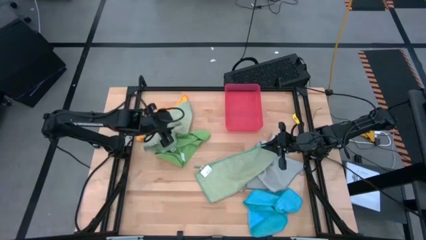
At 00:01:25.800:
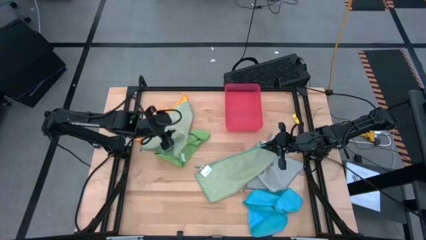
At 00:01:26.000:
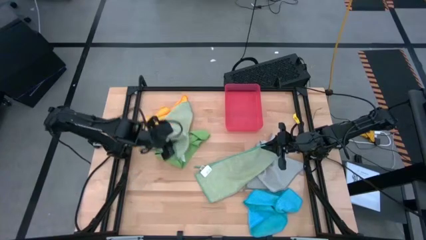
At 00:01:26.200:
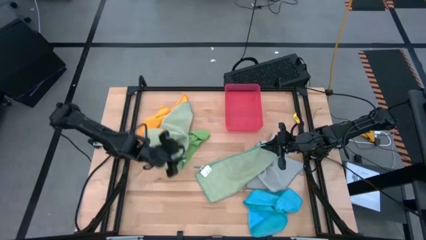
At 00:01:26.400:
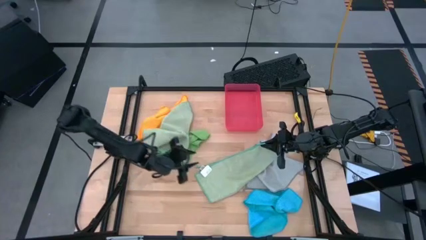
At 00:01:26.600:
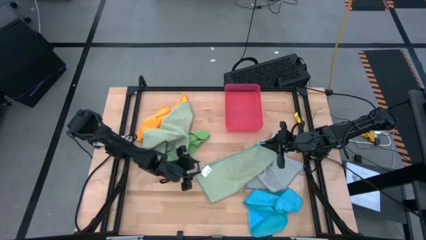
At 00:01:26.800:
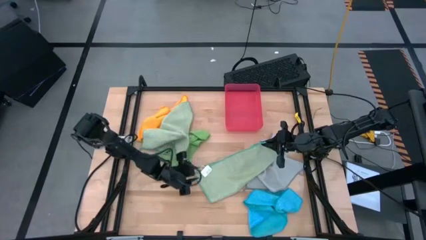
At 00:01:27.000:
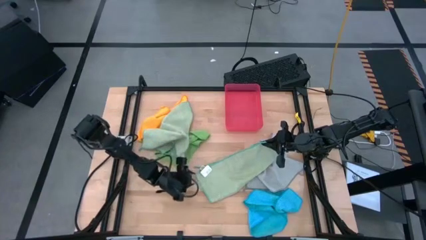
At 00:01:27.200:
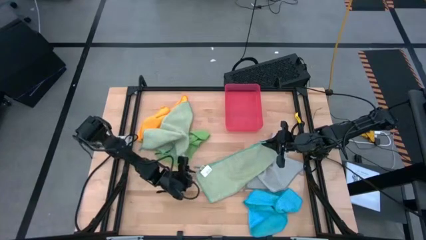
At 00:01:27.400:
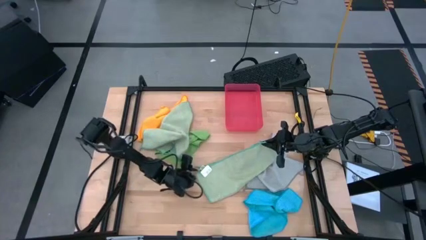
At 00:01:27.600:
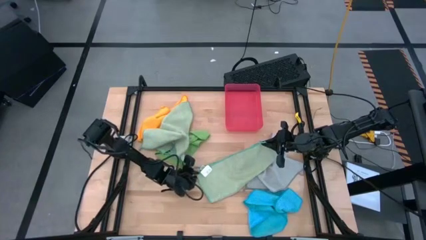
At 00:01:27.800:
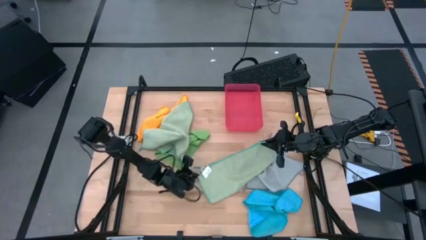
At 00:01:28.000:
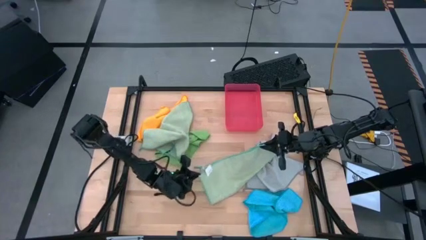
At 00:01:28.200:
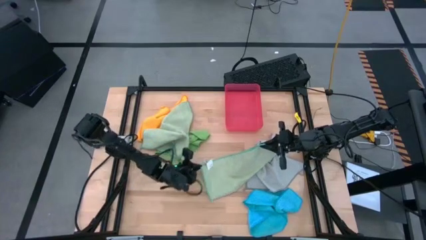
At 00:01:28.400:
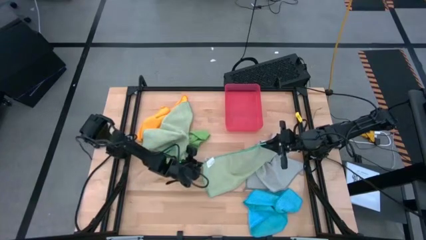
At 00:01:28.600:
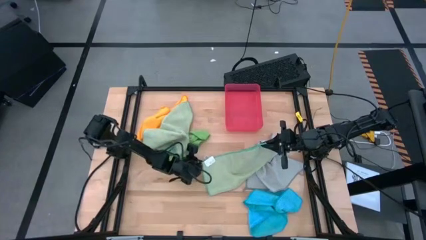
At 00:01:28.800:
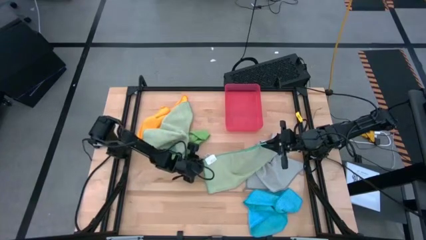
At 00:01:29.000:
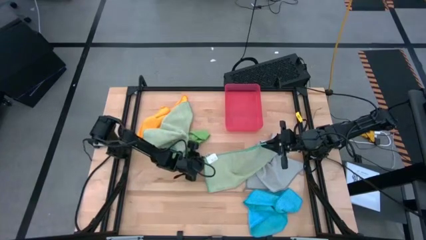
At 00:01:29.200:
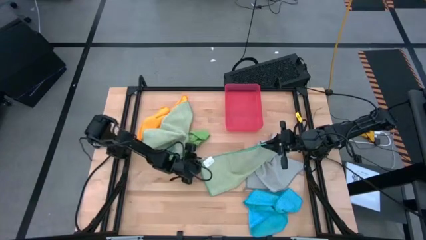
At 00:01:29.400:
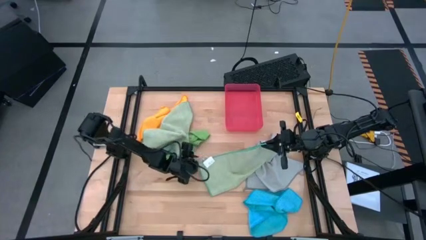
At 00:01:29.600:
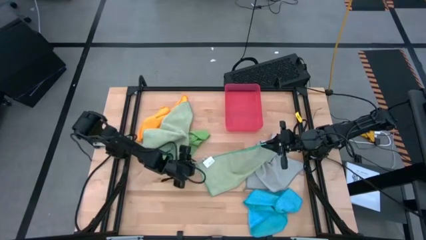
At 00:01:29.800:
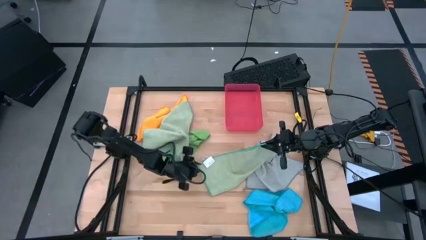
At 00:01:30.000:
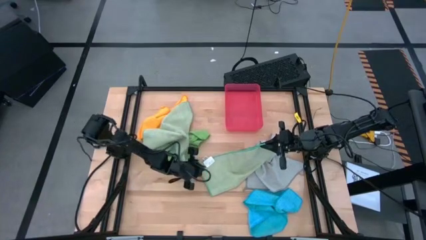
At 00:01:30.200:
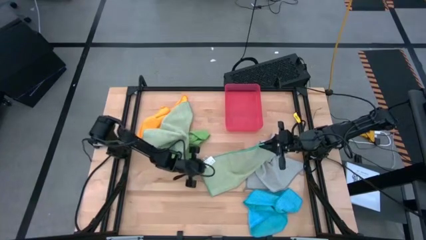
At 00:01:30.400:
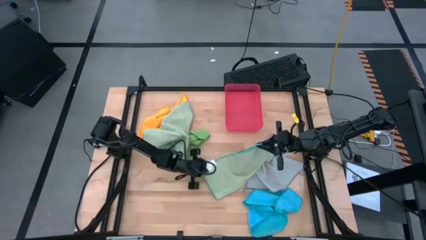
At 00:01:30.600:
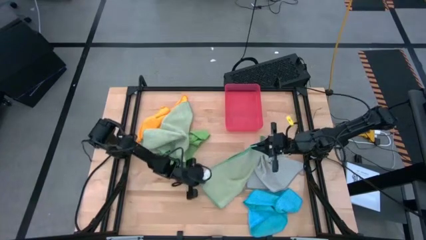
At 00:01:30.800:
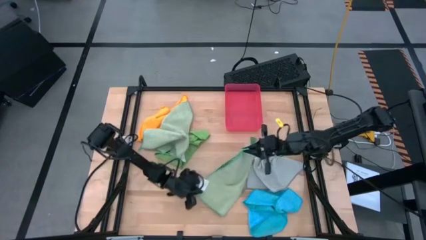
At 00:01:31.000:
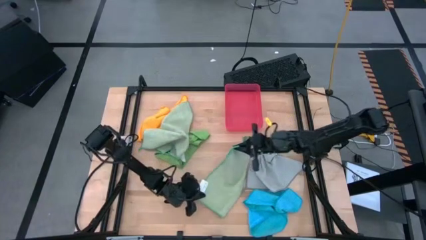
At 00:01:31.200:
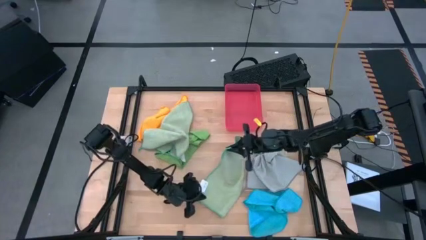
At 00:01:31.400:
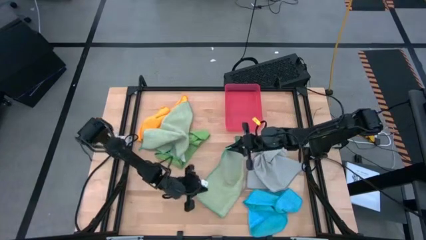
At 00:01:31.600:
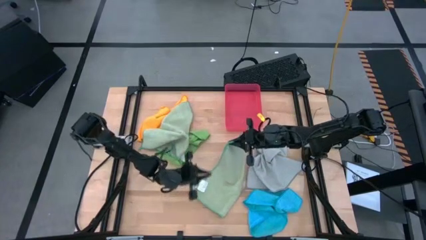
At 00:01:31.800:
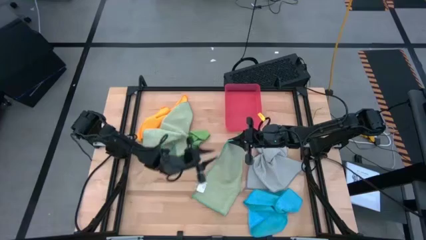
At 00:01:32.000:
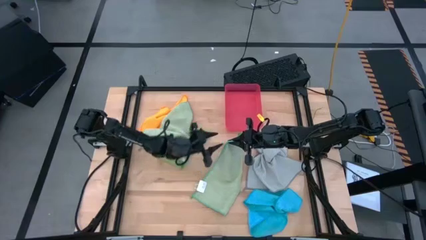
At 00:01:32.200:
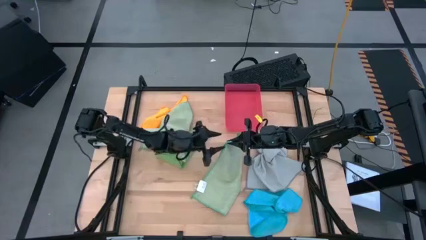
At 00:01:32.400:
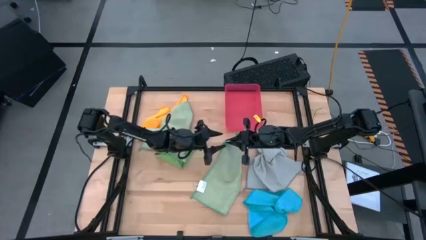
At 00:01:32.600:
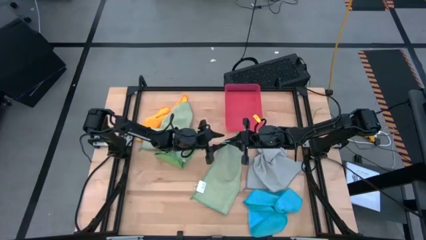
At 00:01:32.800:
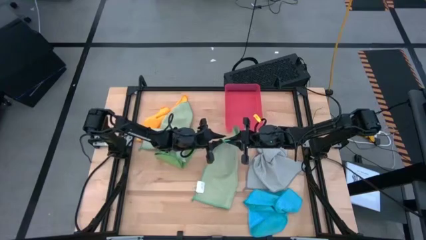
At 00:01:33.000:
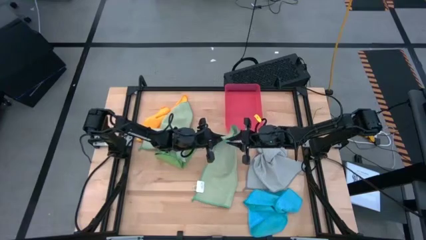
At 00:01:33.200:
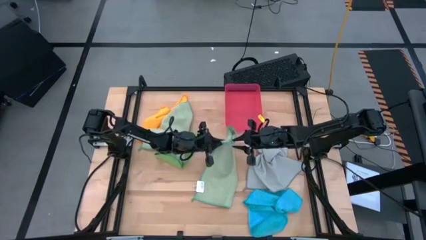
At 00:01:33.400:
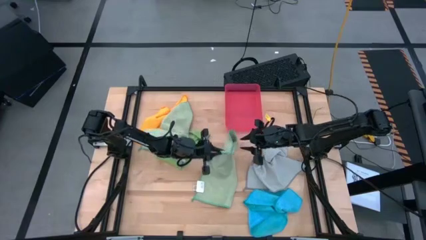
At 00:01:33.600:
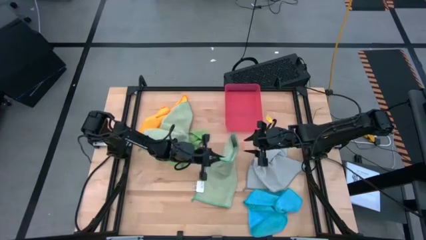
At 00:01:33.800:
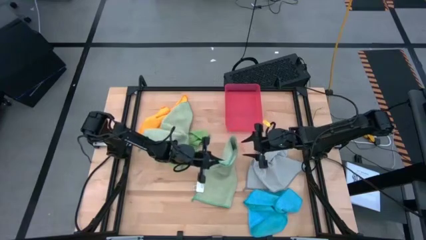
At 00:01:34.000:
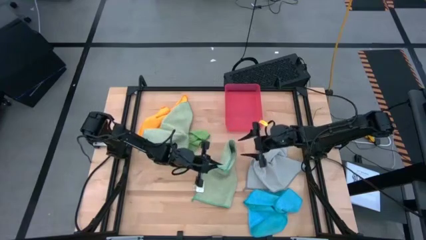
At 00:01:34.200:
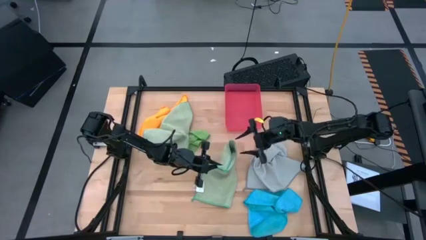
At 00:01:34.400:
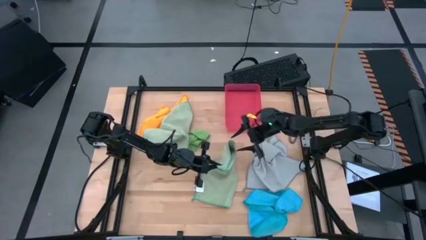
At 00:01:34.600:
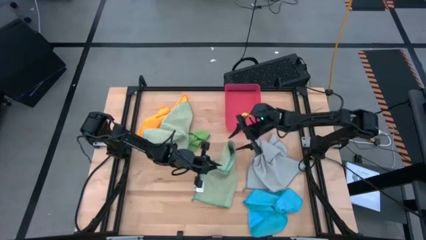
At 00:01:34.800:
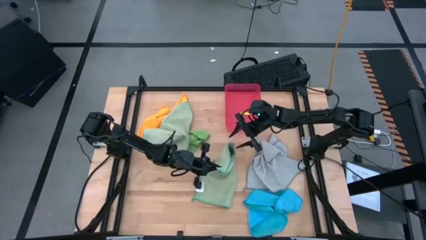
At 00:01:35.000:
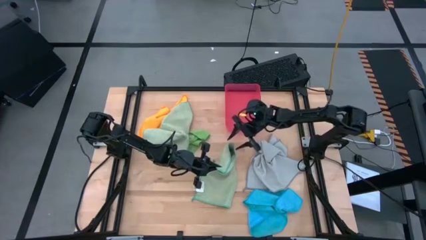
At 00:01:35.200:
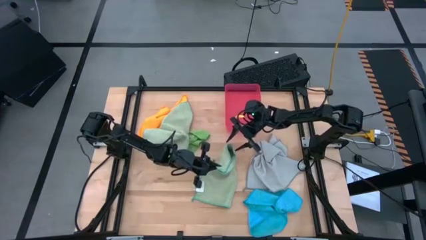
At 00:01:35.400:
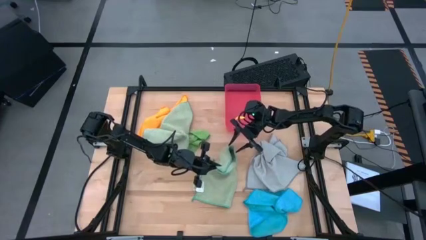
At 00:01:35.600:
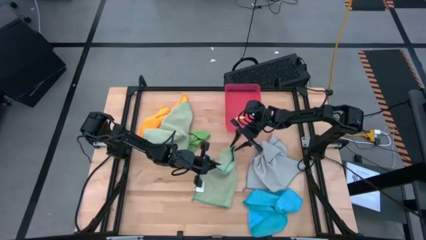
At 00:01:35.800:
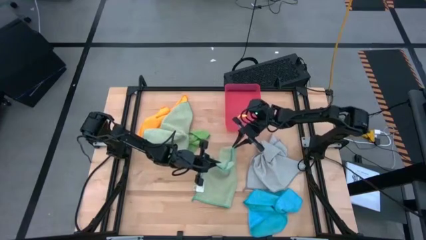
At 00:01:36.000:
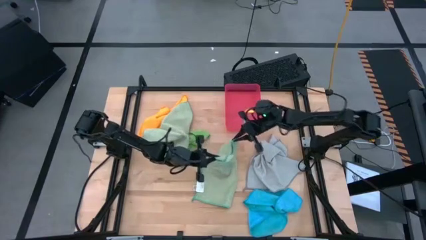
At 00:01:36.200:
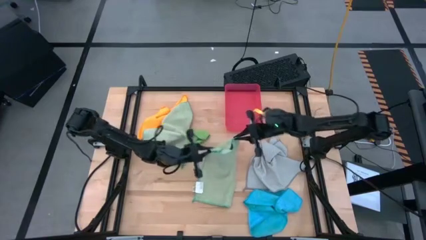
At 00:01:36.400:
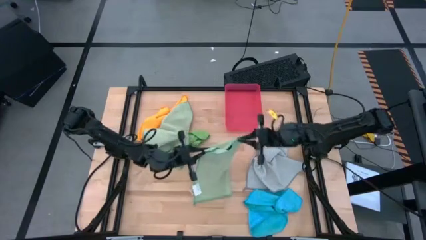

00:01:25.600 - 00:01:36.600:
Task: Fold microfiber towels
Fold the right light green microfiber cloth

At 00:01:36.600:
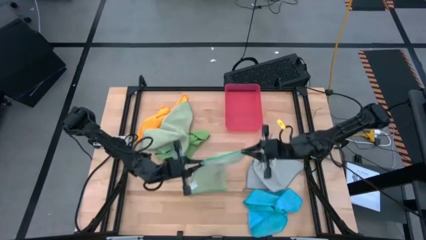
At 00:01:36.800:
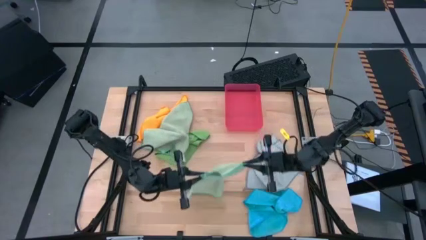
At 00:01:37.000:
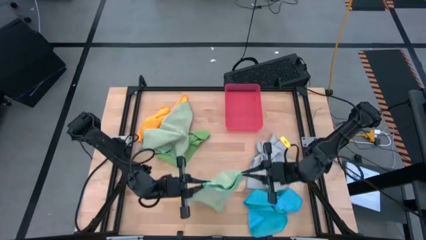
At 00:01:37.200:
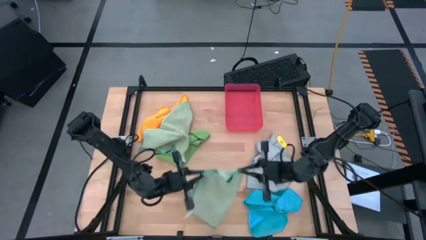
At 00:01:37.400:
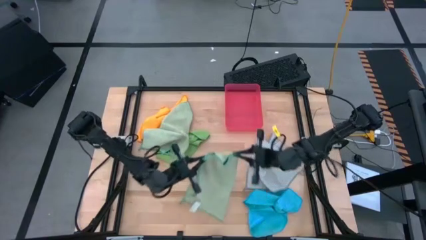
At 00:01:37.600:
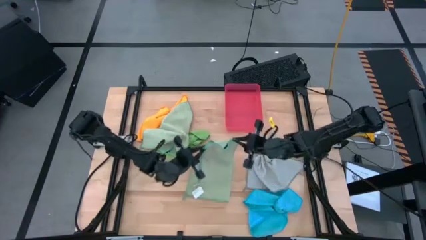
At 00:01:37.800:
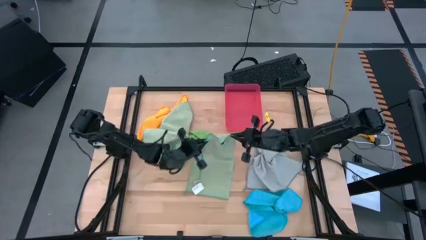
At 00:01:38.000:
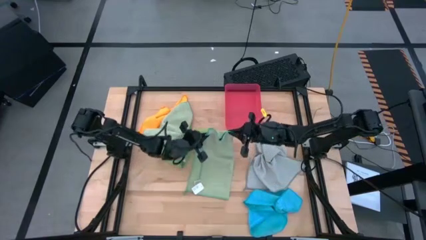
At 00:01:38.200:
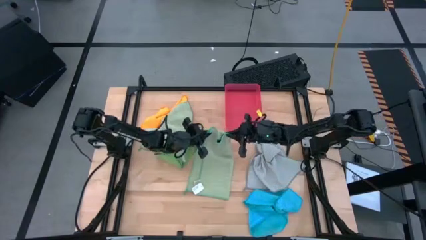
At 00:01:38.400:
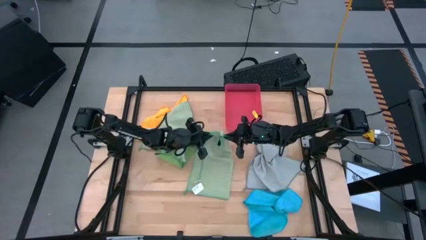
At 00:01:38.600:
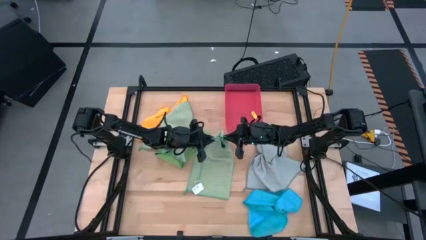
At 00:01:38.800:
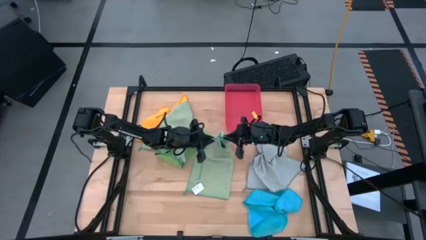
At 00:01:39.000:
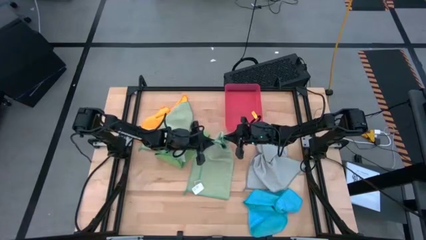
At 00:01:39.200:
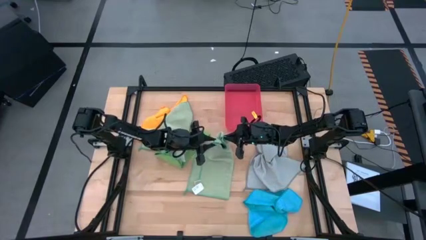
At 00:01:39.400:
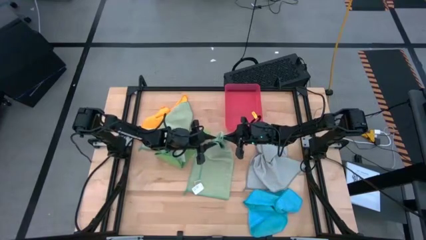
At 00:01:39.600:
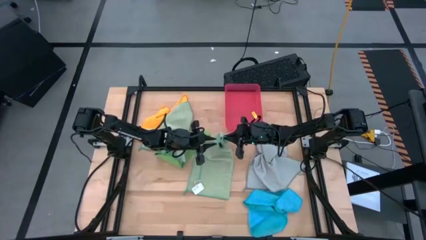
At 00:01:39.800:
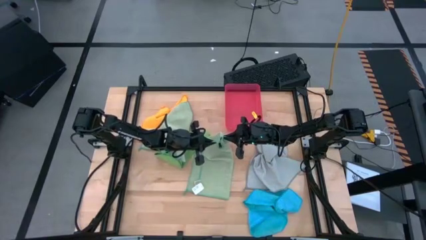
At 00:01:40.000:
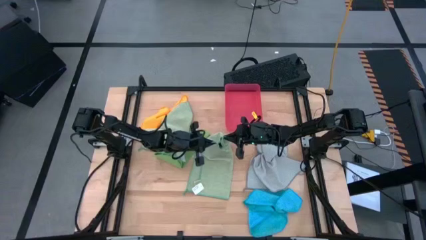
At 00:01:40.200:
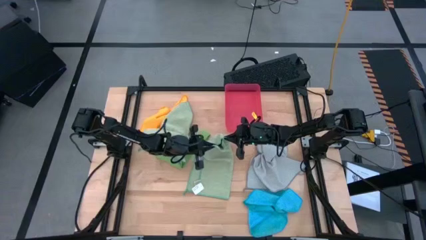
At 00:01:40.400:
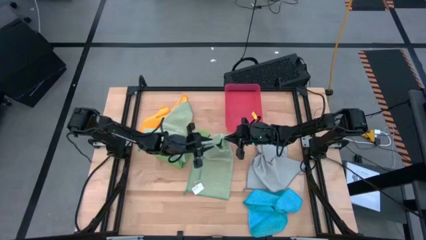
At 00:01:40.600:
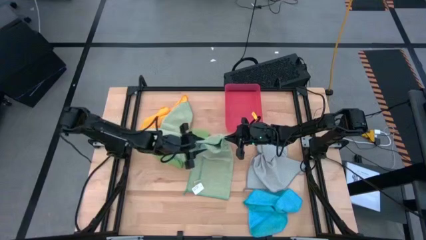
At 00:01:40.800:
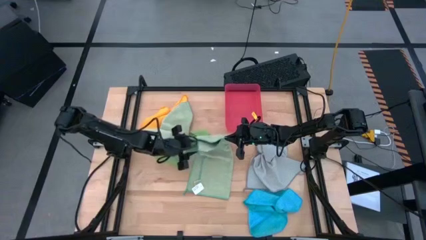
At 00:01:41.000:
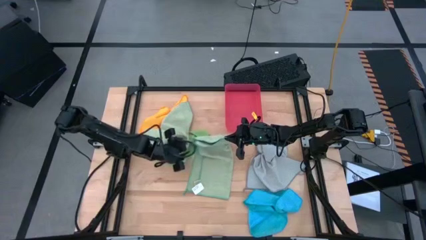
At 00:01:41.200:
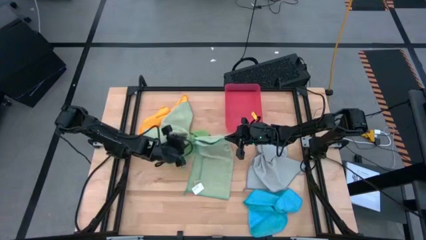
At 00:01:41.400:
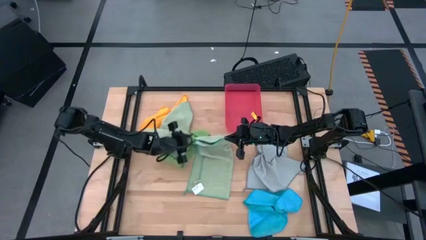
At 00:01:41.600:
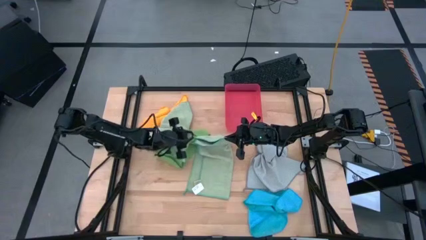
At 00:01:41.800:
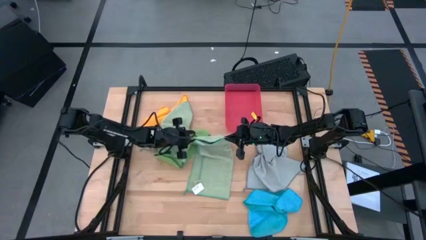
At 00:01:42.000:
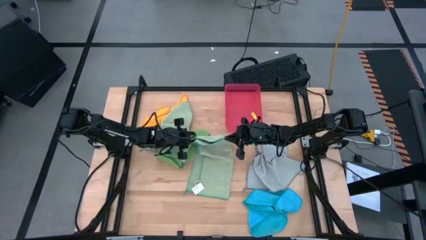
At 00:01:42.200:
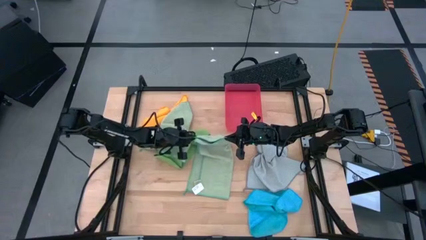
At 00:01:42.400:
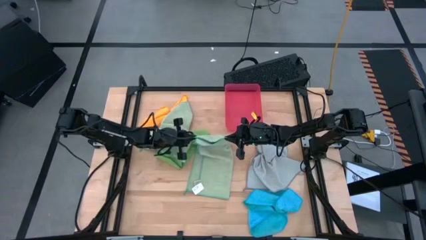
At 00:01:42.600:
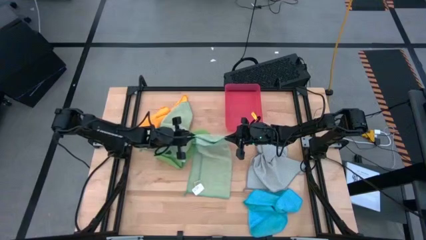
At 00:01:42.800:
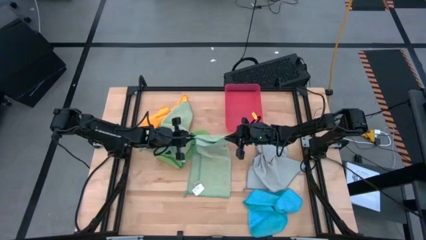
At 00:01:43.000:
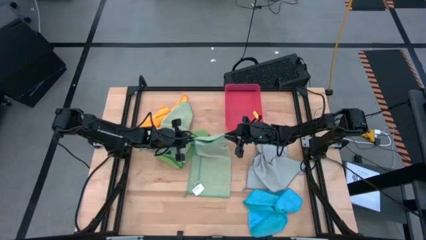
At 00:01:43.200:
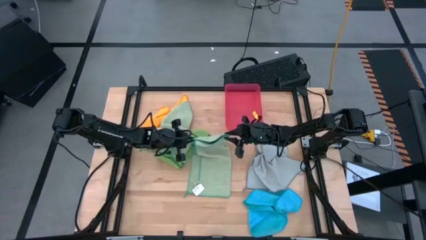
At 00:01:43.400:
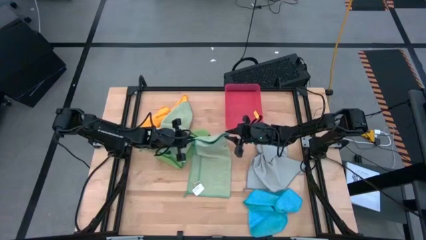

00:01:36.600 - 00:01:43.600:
Fold the right light green microfiber cloth
